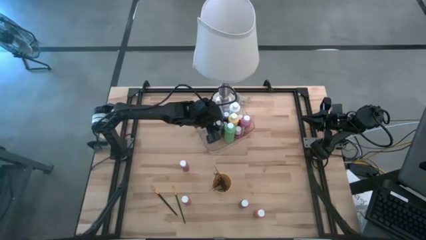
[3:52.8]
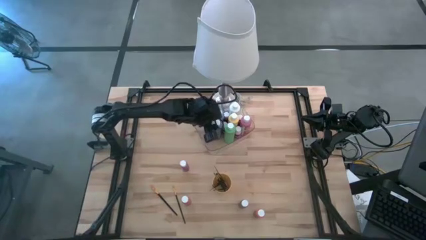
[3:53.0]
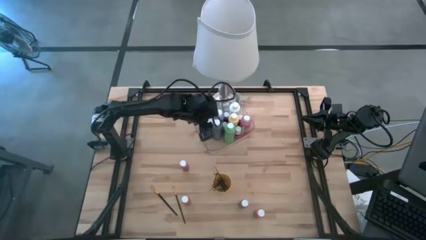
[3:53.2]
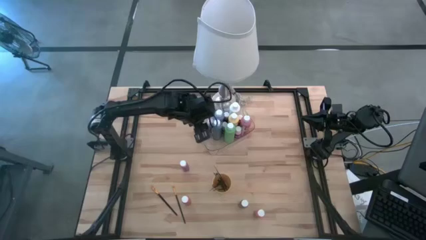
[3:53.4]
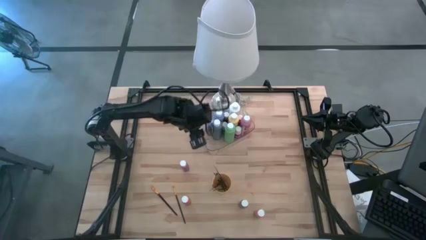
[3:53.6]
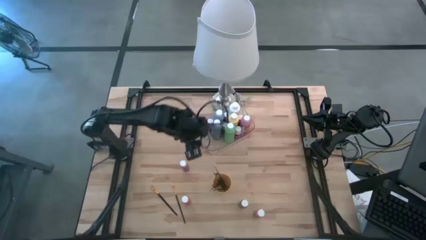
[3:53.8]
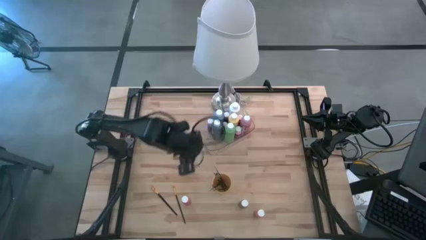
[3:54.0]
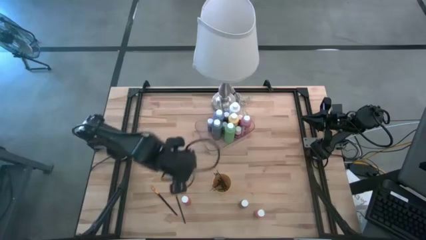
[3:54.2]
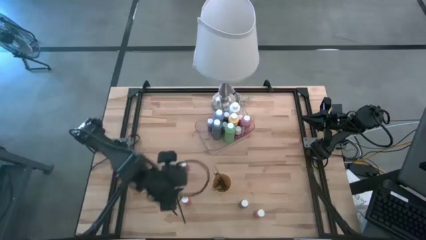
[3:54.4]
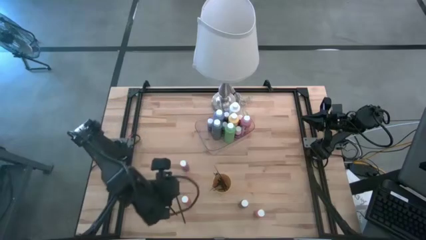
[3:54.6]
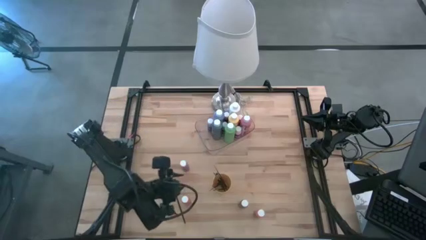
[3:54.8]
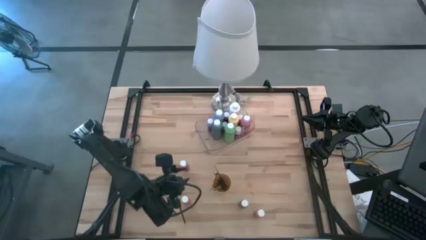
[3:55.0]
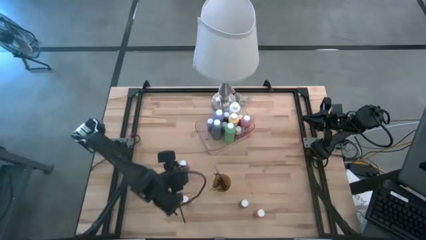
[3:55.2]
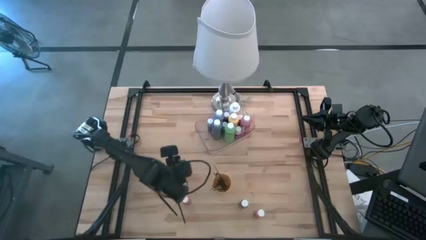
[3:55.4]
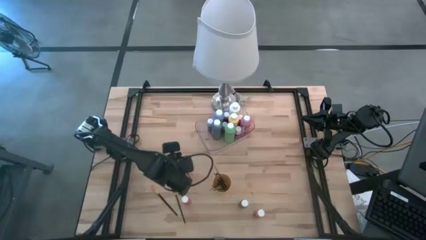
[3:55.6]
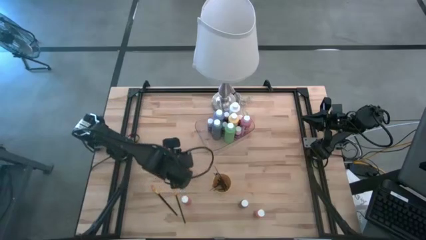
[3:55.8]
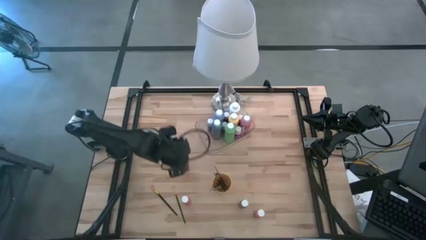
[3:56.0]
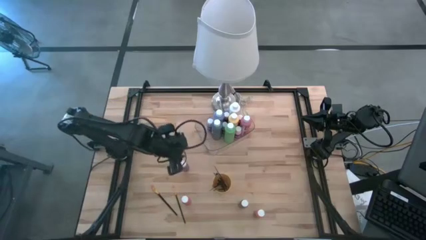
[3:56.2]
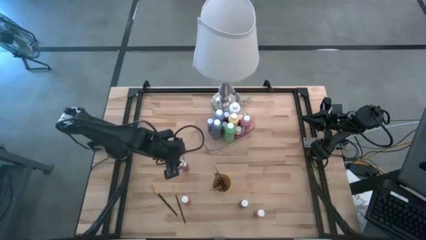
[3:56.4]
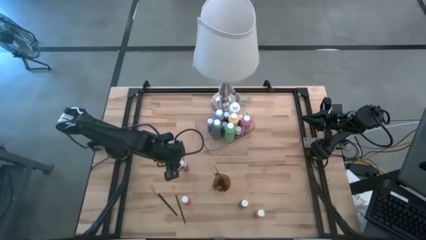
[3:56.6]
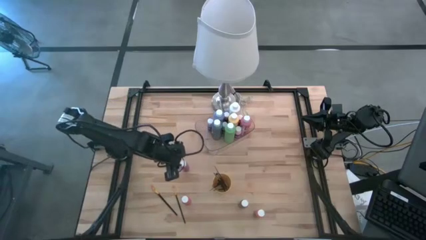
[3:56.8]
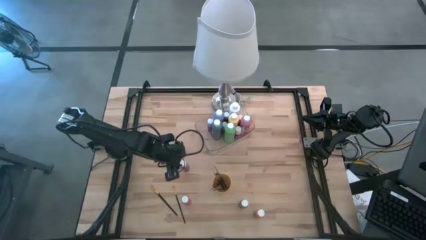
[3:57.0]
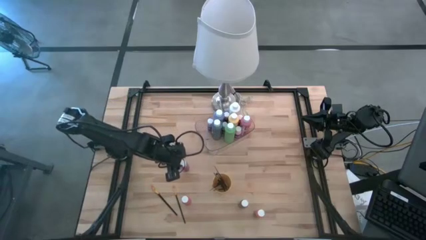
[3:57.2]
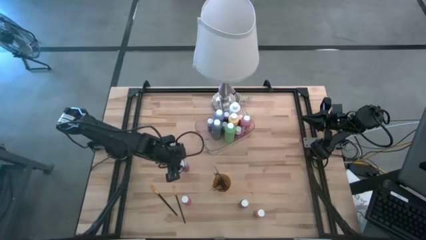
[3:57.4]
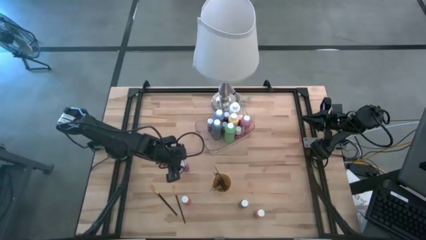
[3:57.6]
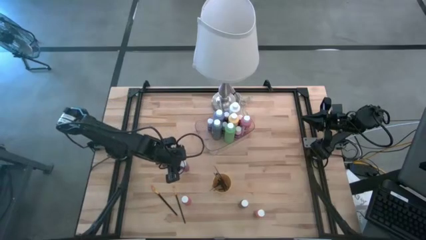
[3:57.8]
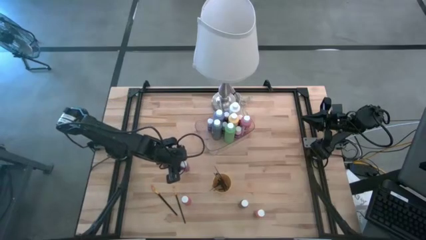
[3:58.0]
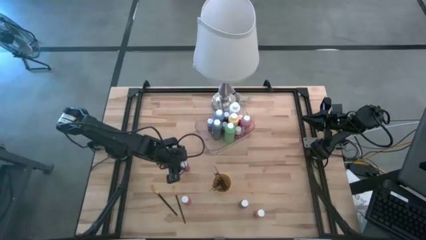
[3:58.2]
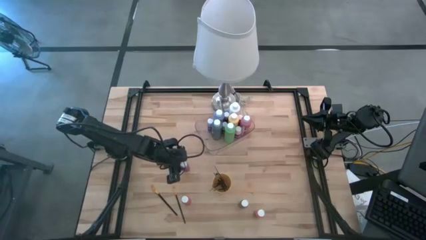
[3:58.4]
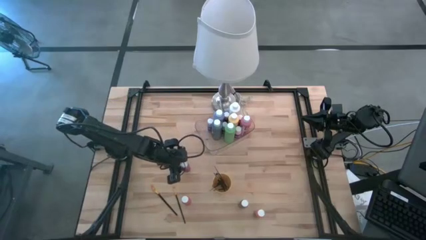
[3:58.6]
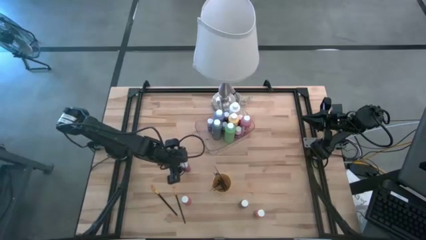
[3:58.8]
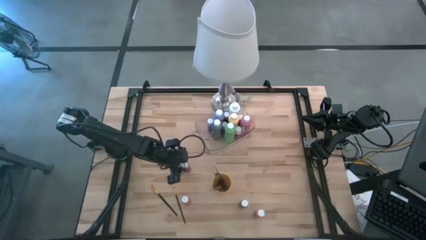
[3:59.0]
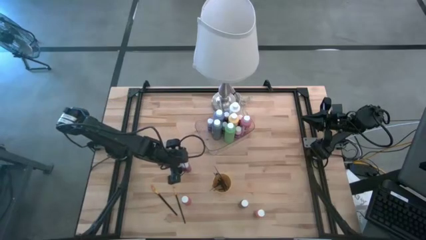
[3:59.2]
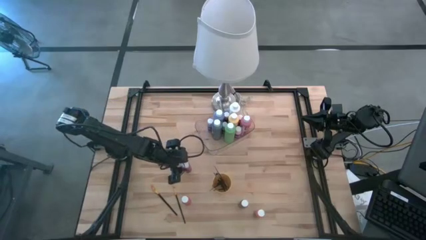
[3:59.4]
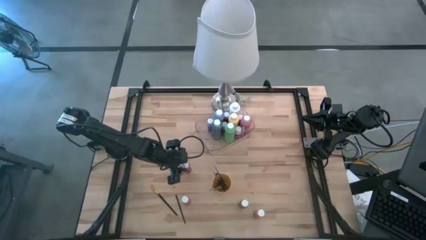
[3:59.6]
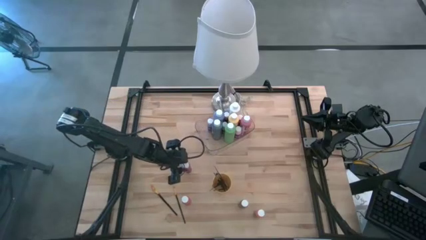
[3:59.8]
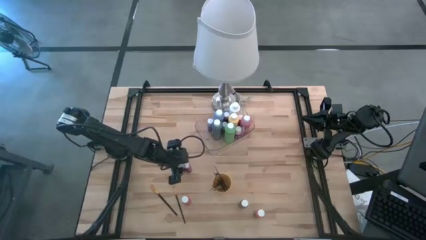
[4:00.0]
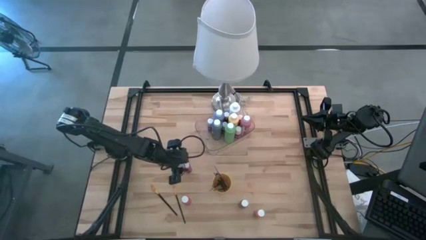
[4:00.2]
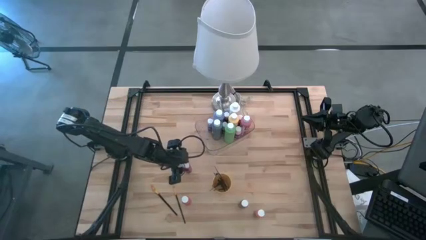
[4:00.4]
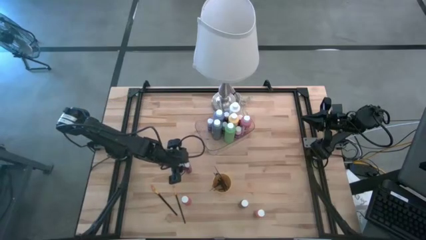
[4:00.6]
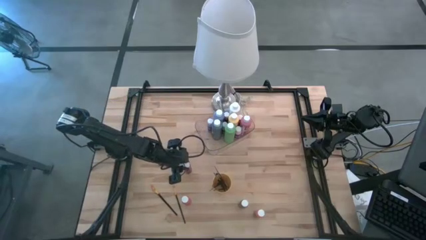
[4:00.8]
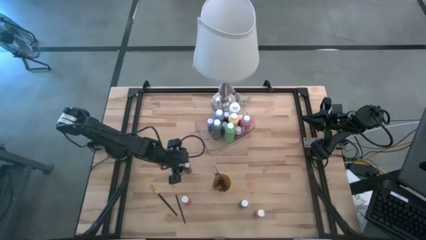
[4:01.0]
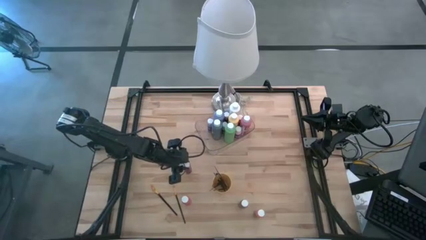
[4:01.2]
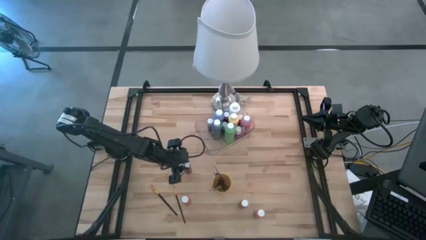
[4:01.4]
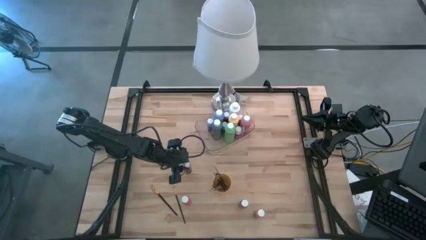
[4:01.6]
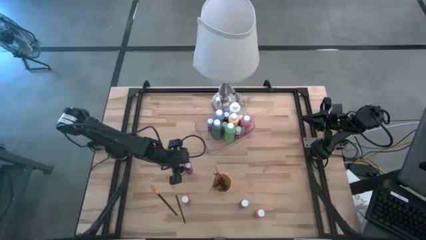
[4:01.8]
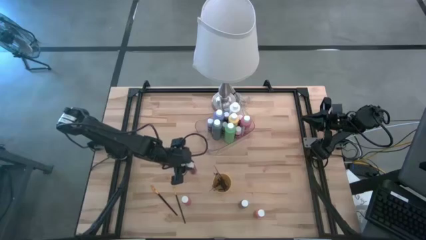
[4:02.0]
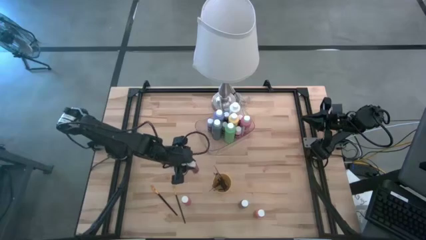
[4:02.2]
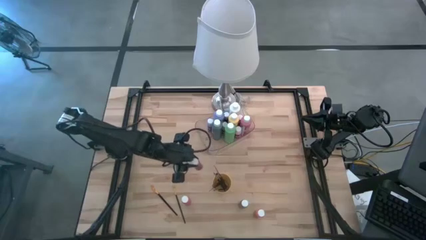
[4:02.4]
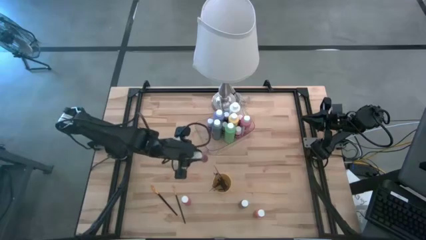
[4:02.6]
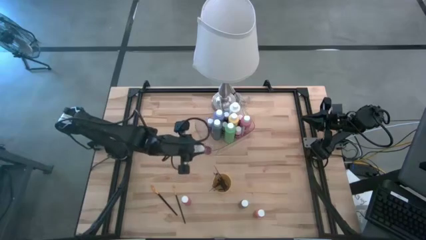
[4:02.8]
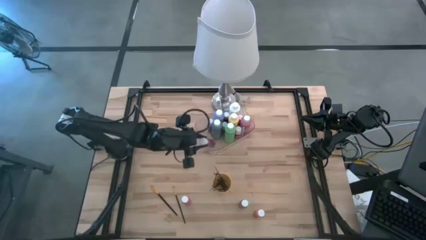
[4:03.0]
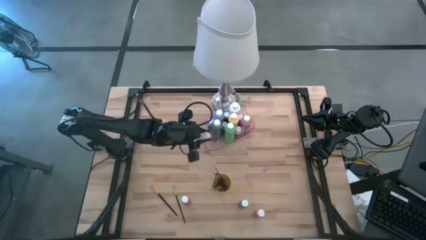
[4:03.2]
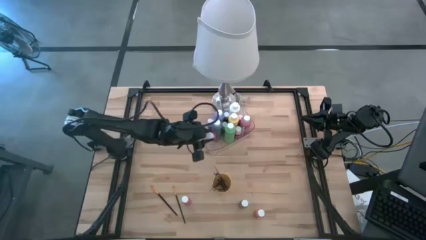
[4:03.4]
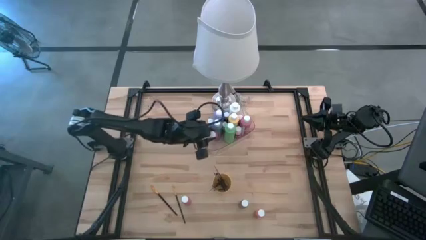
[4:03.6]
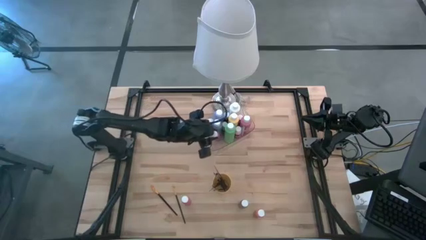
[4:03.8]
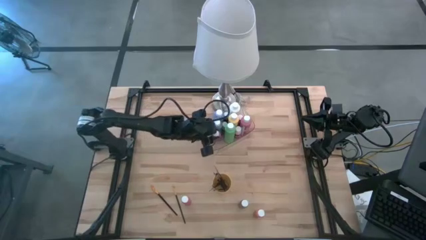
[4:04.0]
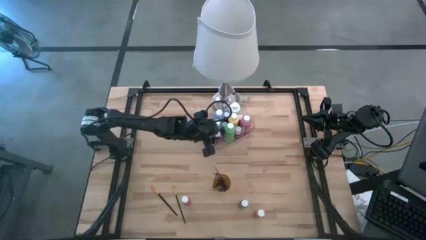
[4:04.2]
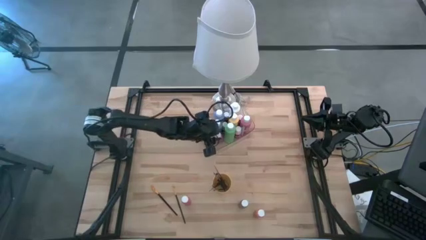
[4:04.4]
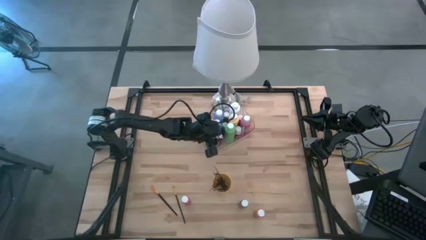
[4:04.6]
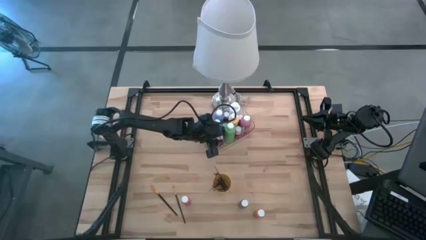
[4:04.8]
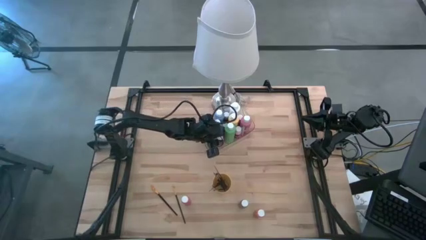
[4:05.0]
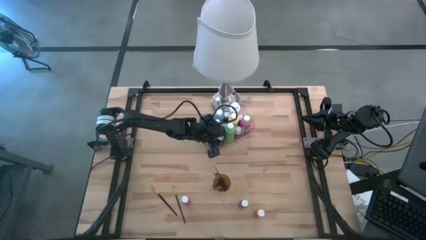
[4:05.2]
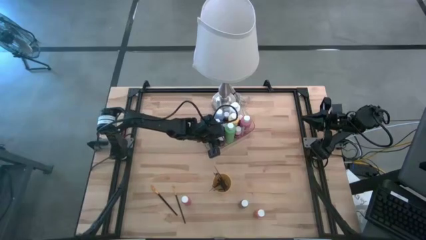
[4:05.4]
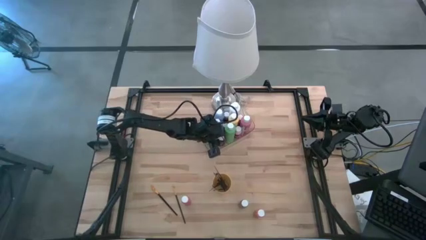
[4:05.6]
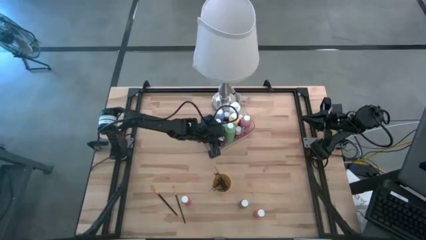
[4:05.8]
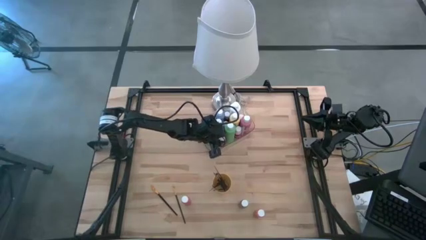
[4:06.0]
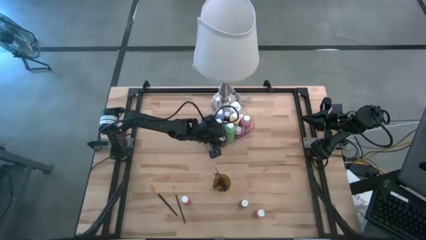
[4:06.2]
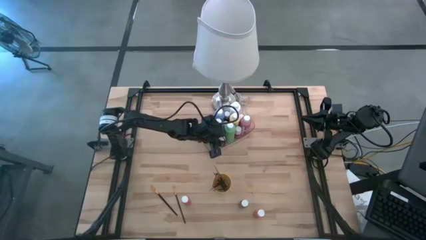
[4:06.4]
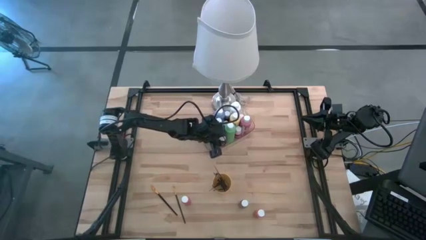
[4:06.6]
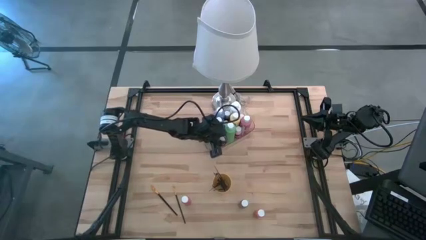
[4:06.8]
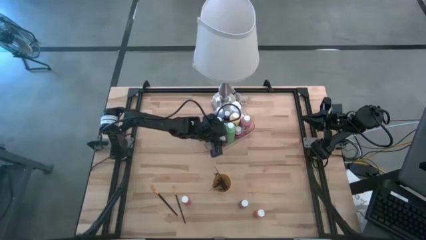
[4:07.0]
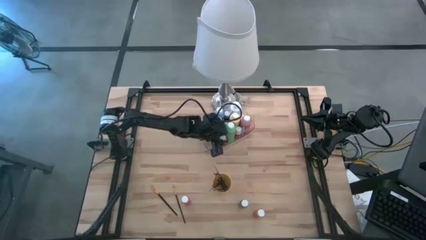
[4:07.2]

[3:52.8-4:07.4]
Task: Pick & Place Paint Supplies
Put the pink bottle into the transparent bin
